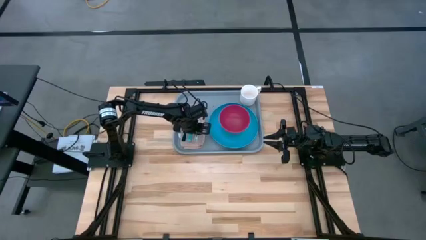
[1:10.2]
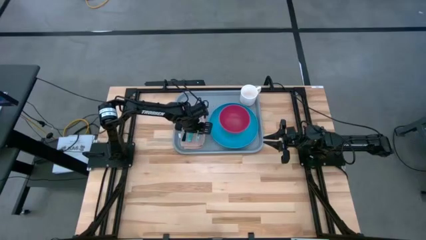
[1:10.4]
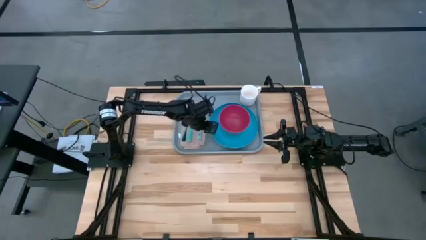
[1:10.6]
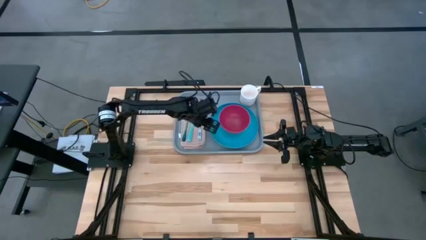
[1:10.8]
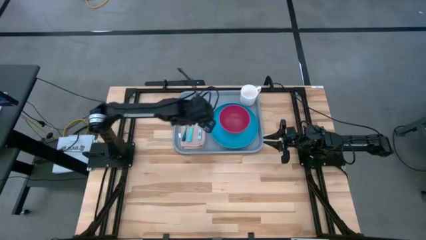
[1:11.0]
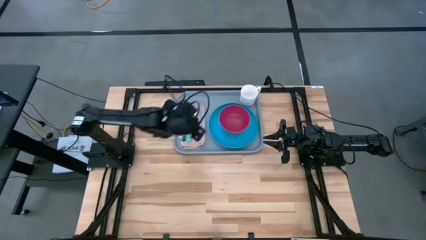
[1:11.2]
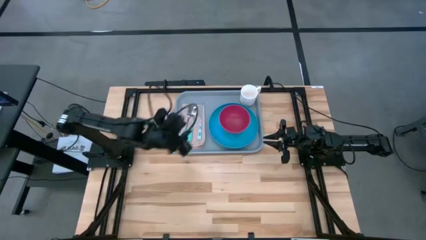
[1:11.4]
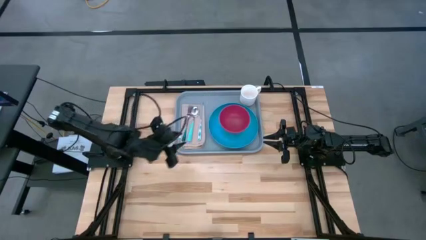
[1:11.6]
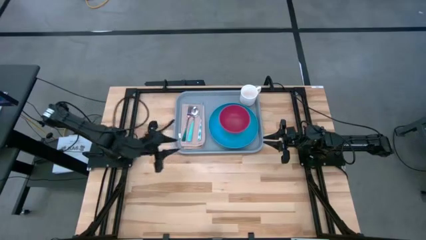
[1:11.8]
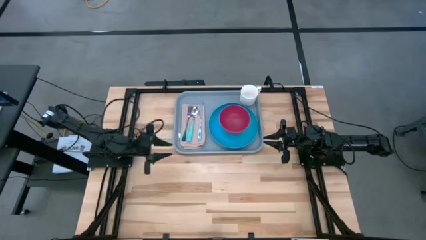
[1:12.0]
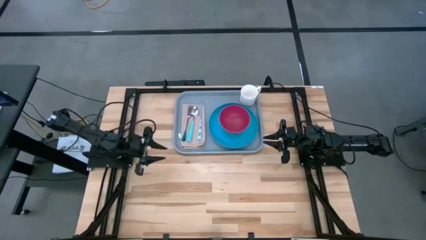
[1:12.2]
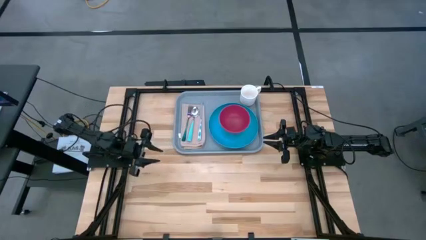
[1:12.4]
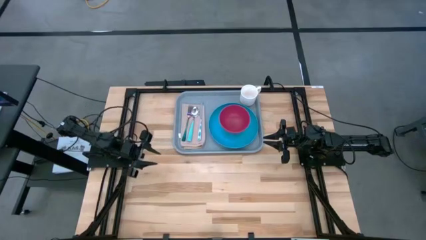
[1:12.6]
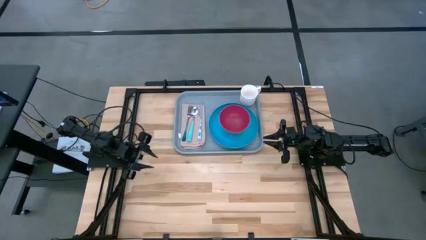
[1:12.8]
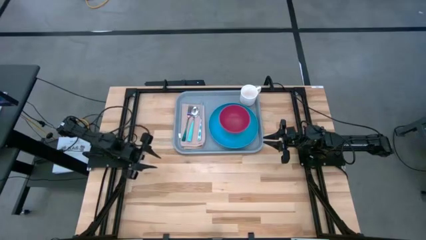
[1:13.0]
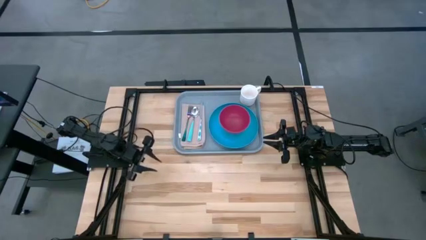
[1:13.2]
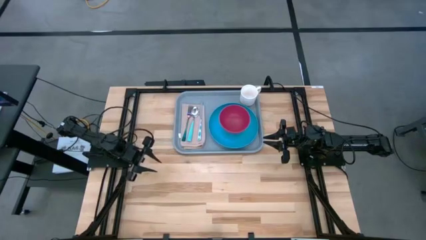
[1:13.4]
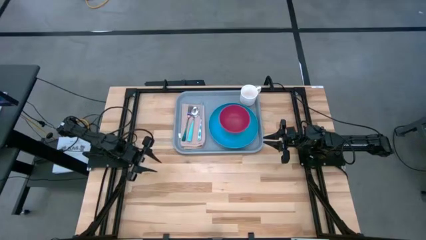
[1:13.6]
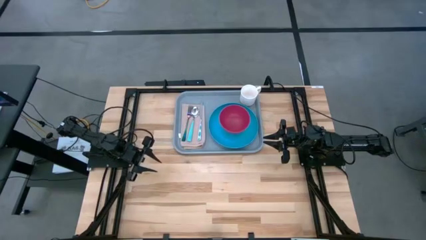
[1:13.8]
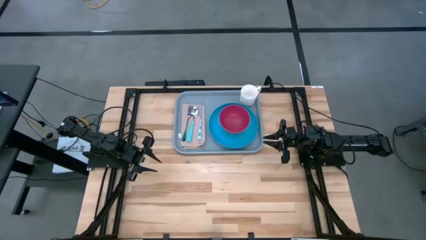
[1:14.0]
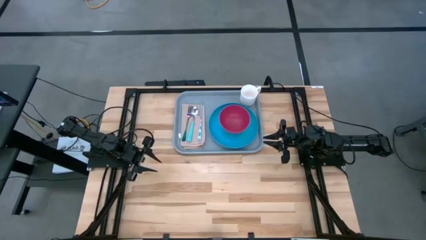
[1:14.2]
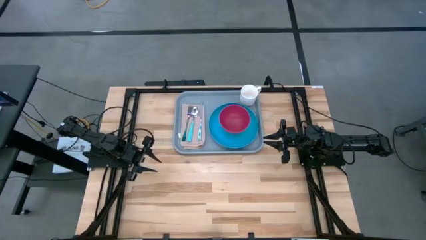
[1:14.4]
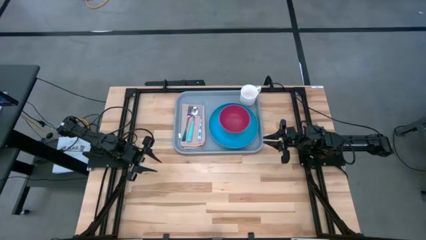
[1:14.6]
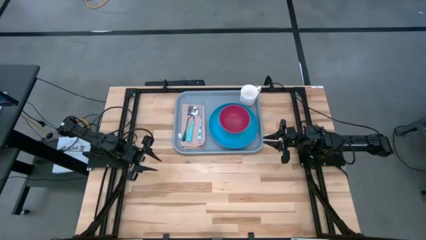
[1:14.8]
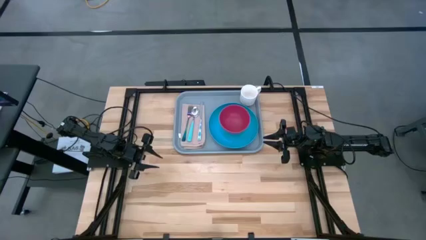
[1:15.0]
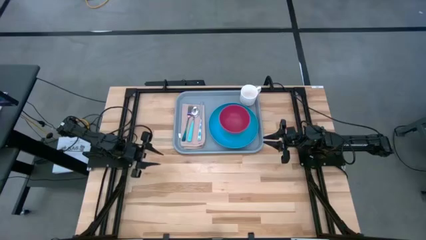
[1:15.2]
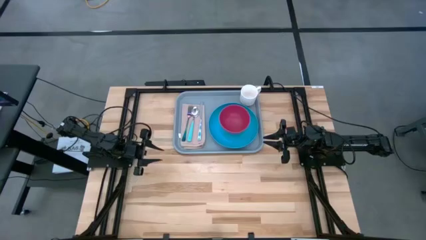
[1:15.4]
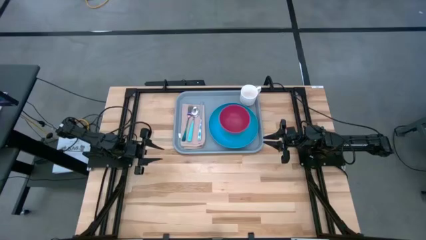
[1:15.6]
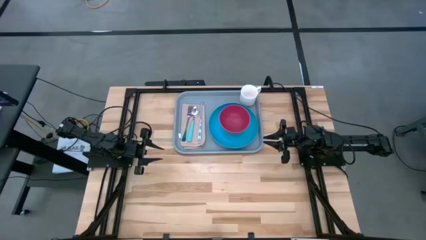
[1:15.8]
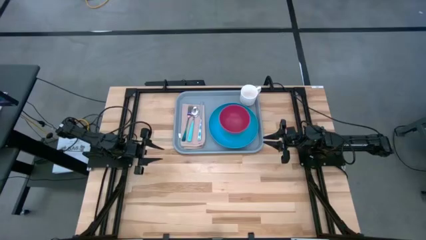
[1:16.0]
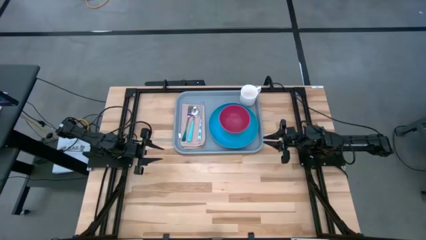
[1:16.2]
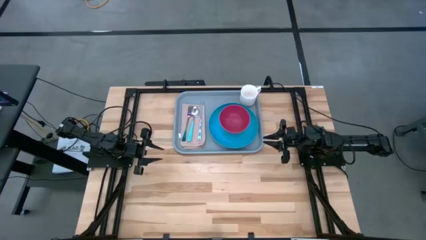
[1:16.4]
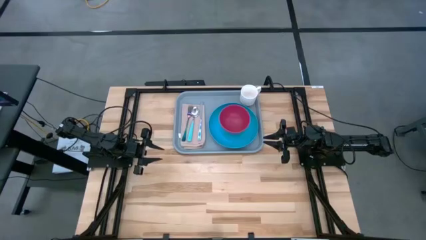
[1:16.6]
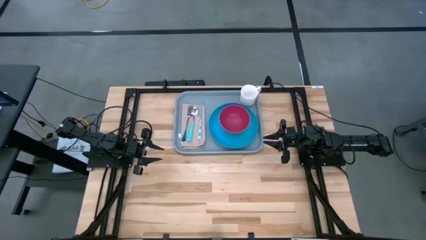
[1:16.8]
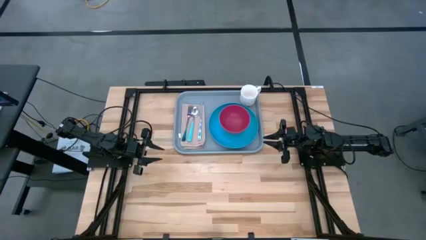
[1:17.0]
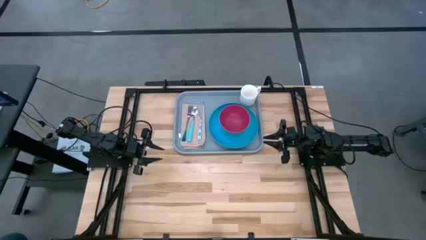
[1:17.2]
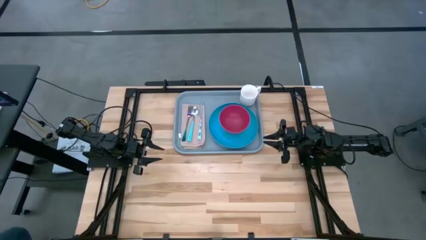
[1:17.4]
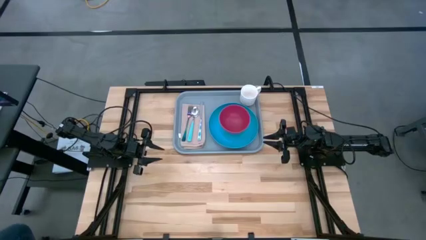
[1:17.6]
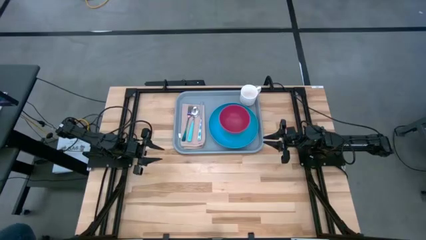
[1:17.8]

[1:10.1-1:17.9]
Task: Set up tray
Return to Home Position

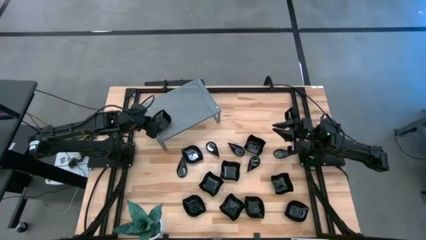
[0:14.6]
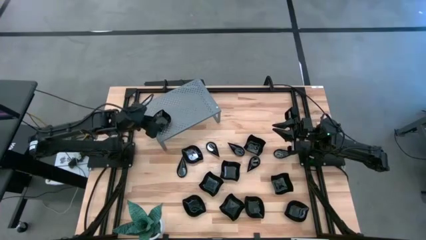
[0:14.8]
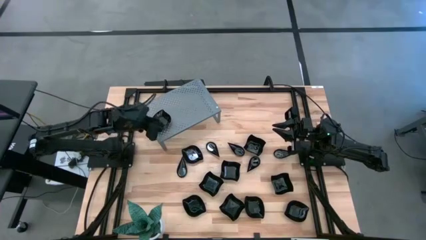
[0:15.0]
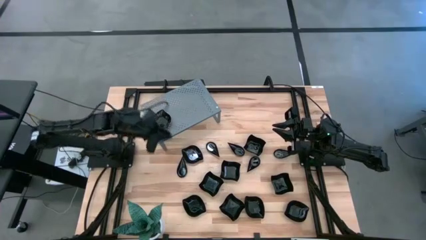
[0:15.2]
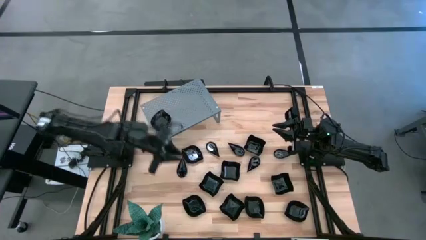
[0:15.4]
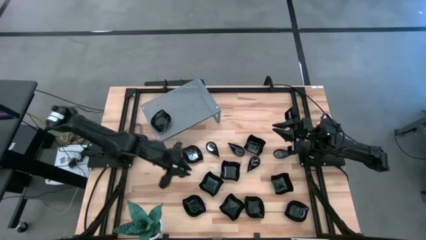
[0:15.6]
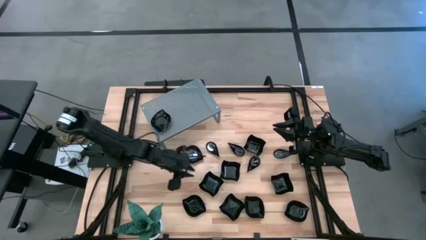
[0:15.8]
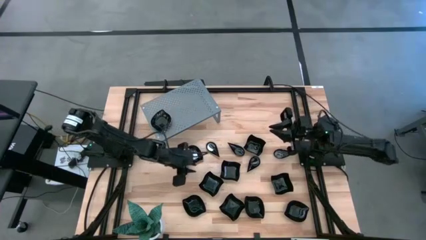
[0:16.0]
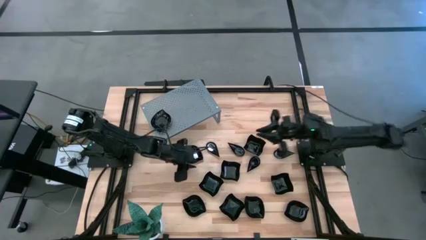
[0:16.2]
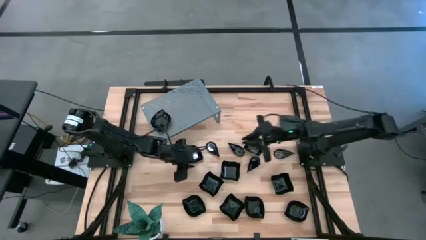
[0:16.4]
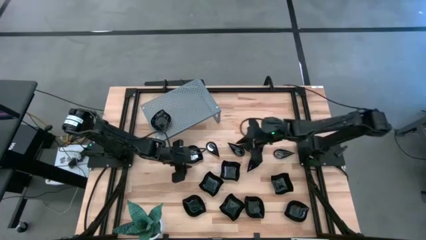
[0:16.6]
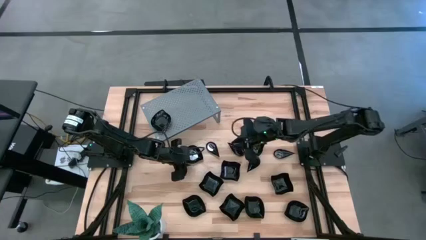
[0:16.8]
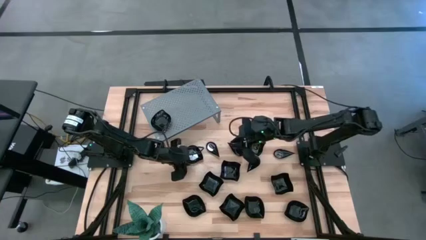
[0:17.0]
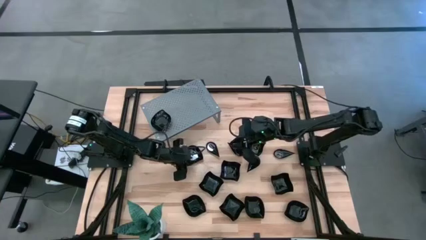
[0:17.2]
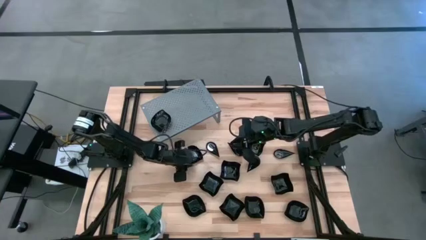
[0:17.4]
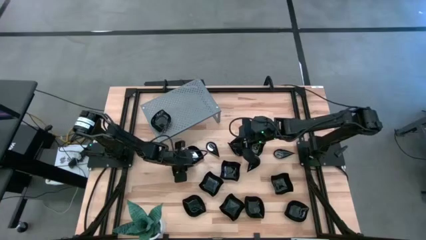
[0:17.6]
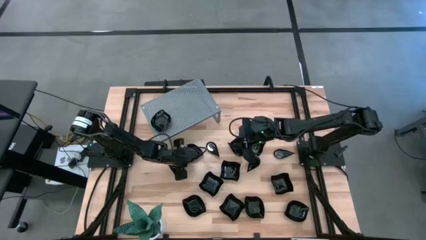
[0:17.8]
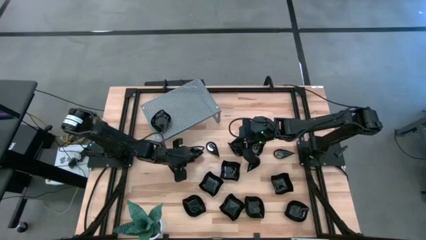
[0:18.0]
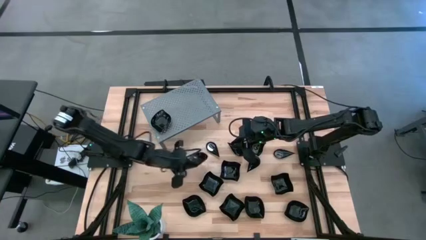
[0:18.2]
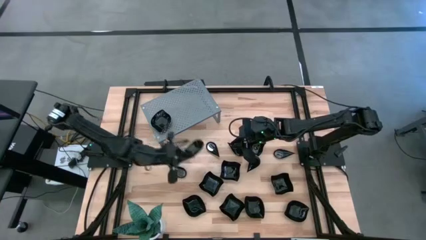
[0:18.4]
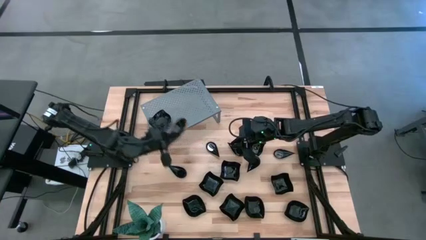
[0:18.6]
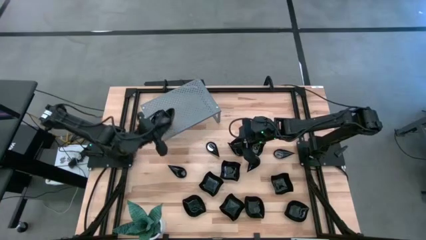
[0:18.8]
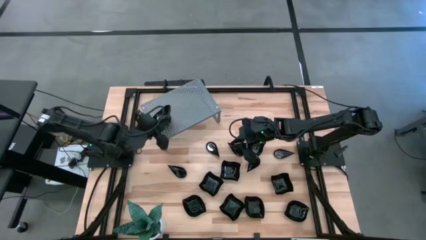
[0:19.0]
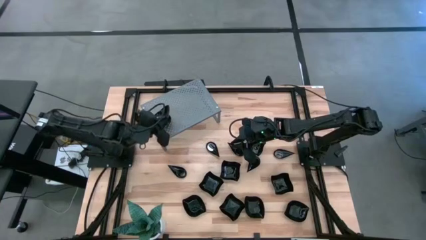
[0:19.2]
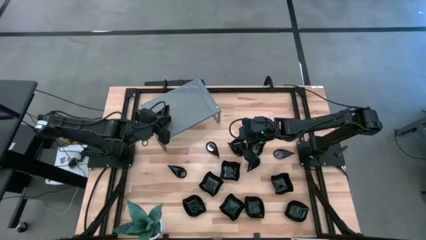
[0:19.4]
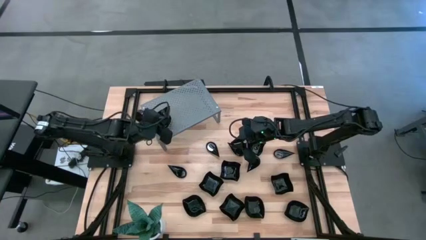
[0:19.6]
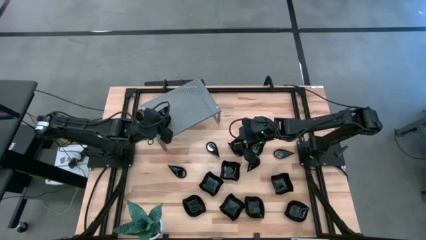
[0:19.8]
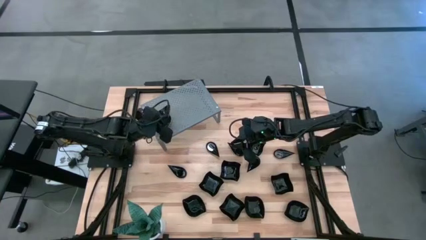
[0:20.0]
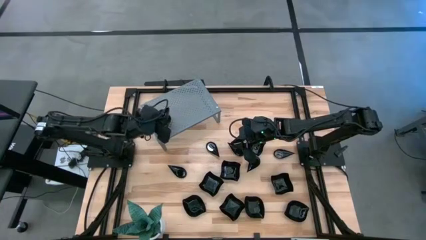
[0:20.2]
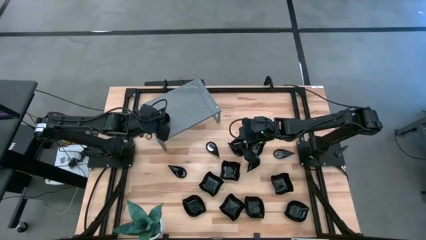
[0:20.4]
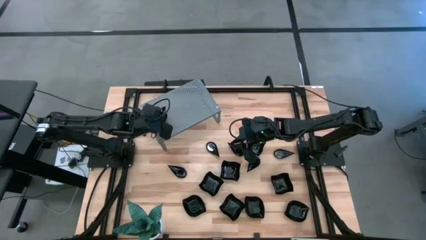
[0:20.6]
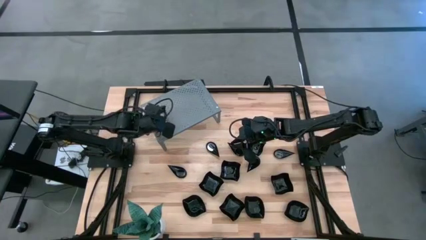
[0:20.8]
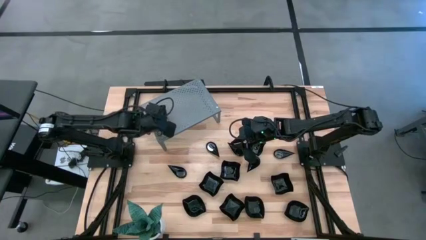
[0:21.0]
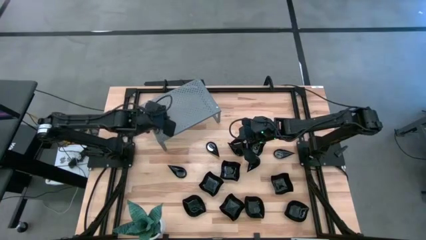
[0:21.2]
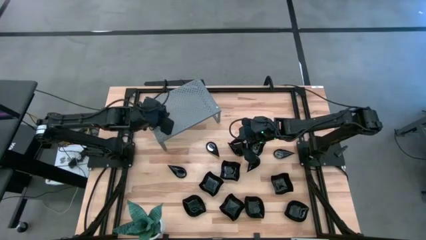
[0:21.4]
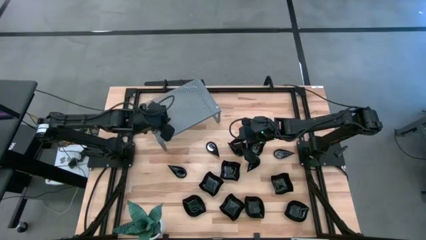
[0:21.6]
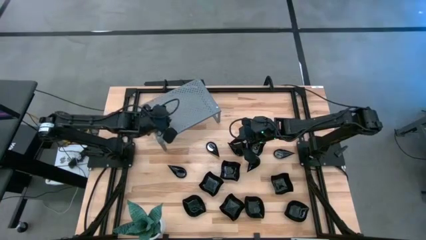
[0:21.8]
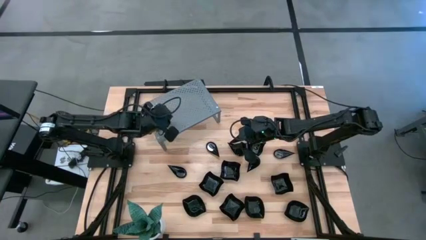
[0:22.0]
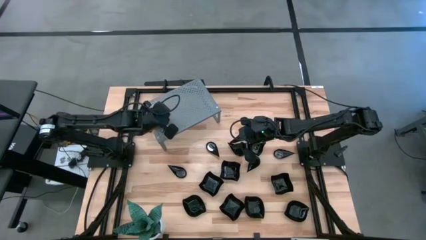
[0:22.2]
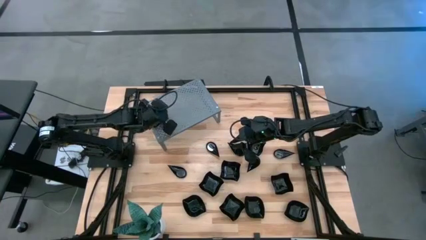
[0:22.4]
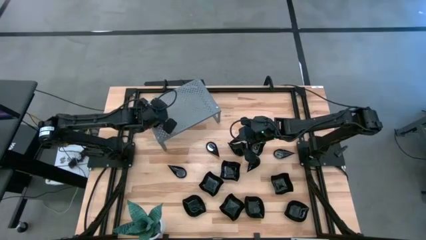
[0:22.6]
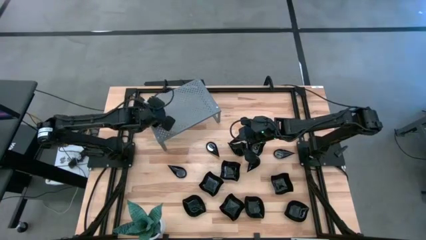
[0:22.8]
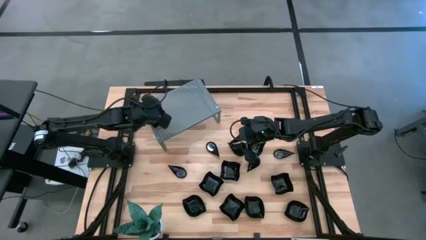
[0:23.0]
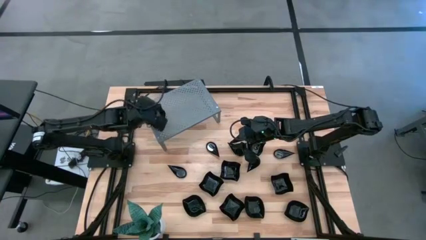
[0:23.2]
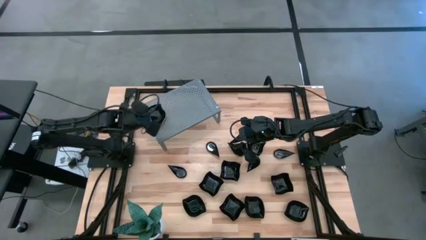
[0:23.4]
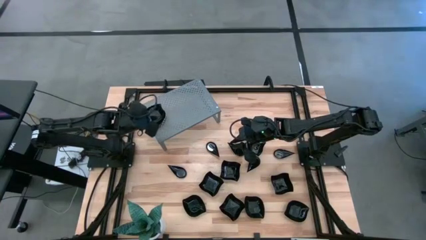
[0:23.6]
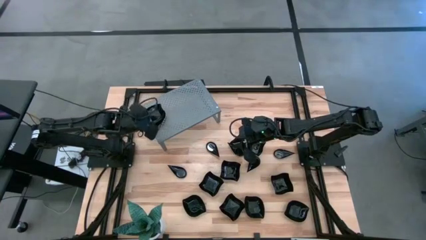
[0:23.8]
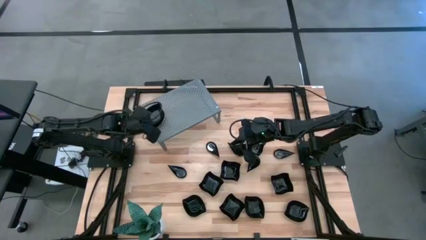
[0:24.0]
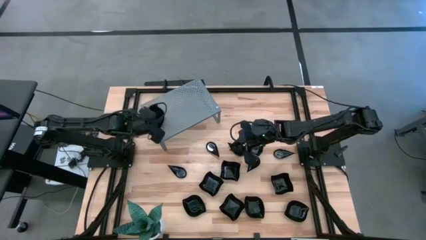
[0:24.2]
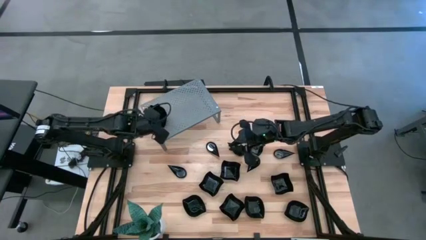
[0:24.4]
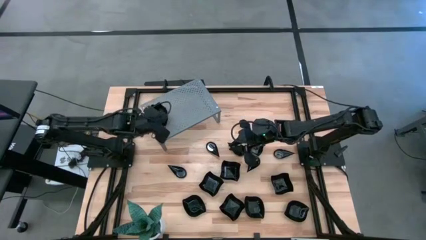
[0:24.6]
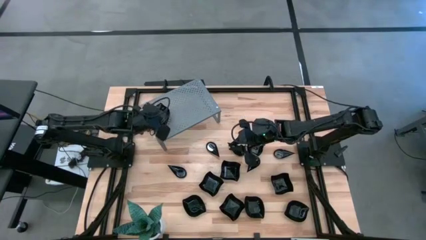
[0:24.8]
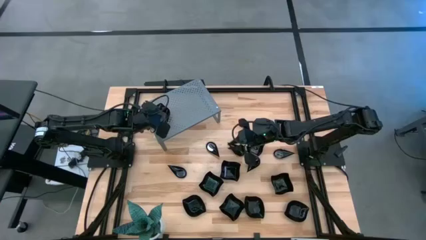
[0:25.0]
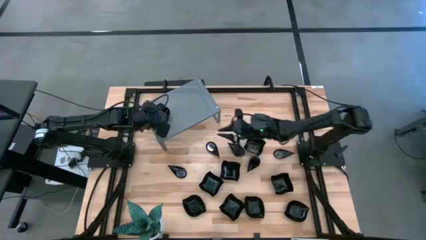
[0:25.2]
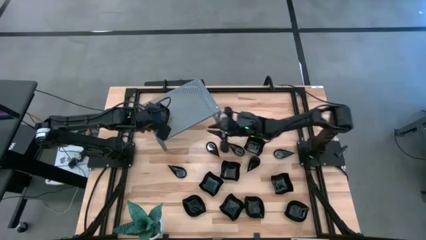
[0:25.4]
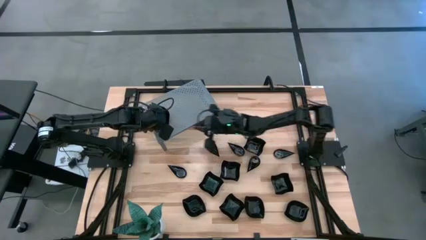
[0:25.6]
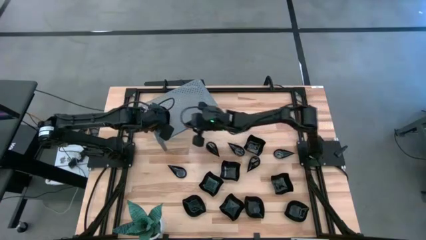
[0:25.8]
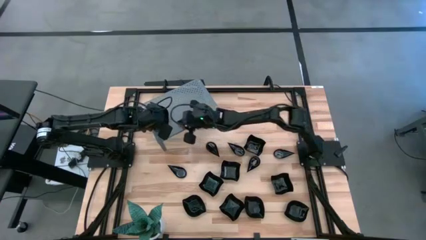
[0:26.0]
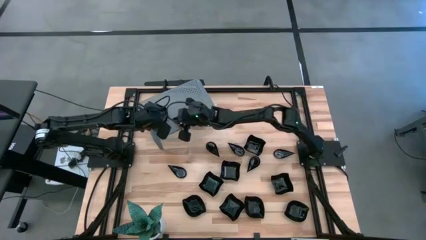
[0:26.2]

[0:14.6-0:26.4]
Task: Pick & Place Mini shaped plates
Stack the black leaf-shaped plate on top of the black leaf-shaped plate on the shelf
